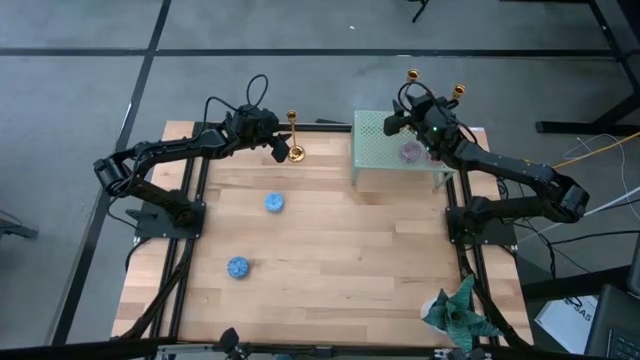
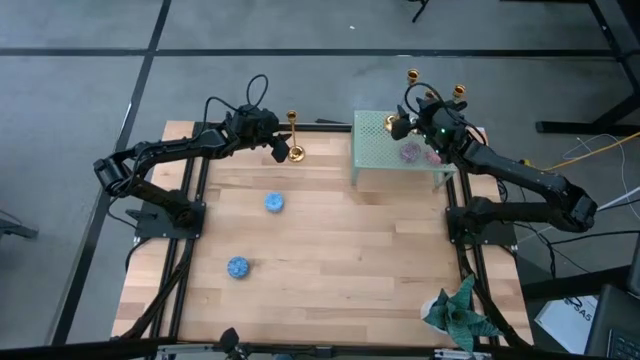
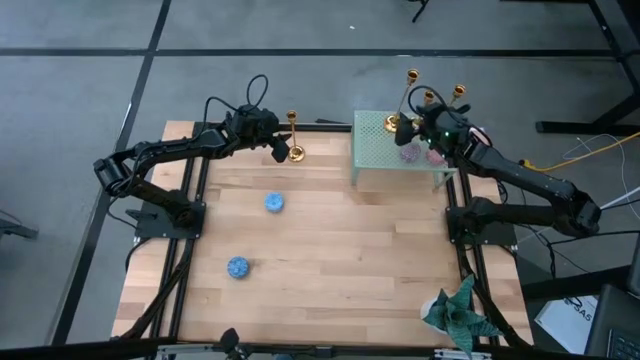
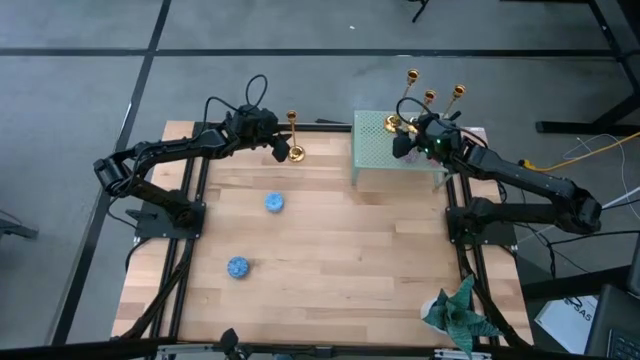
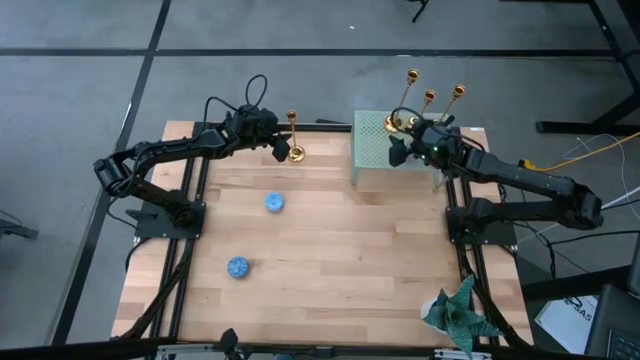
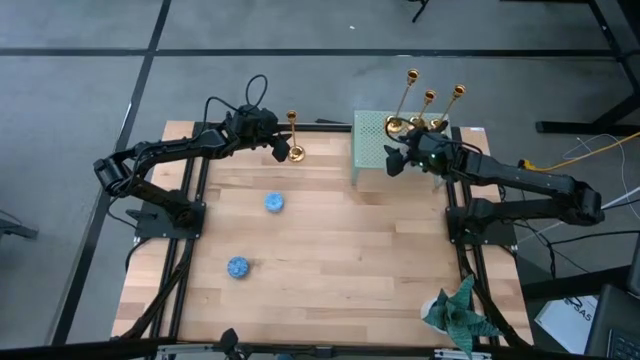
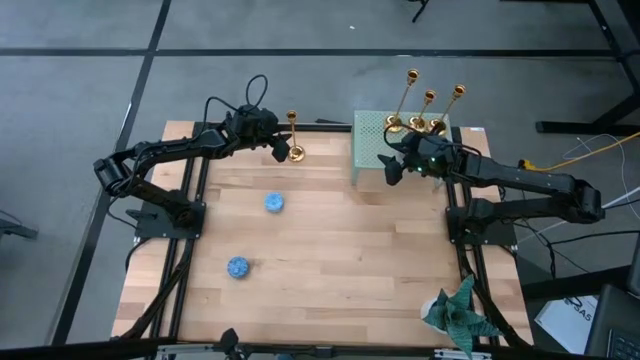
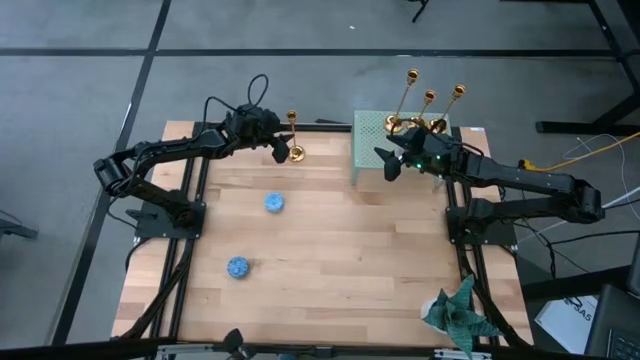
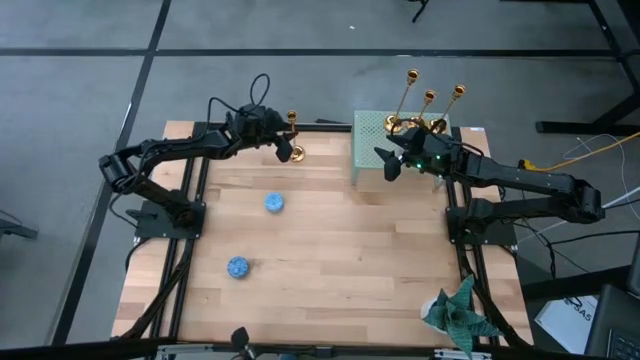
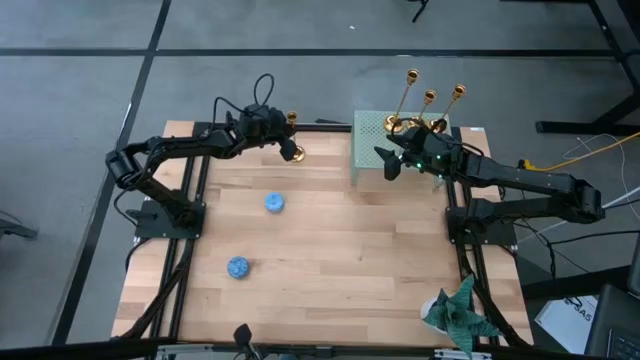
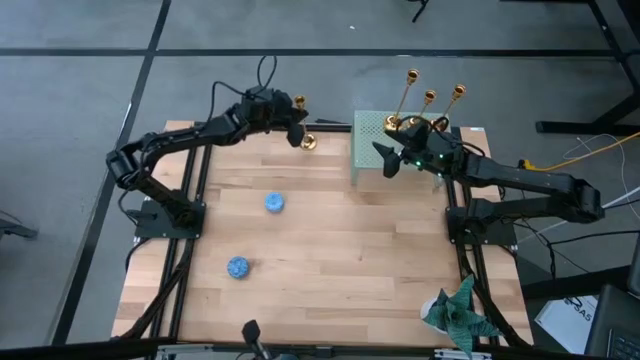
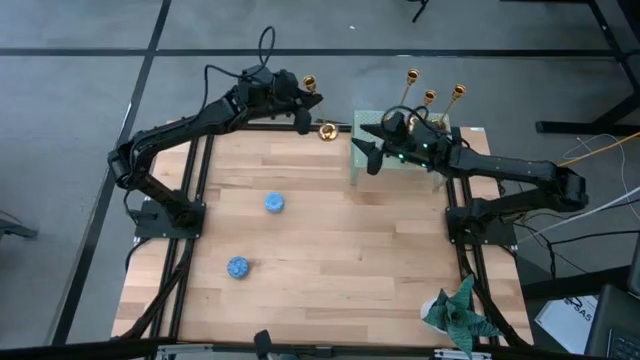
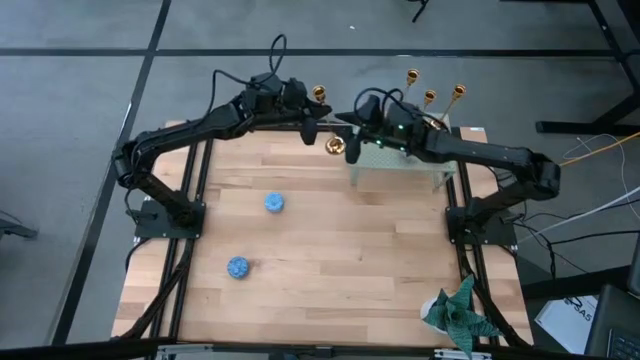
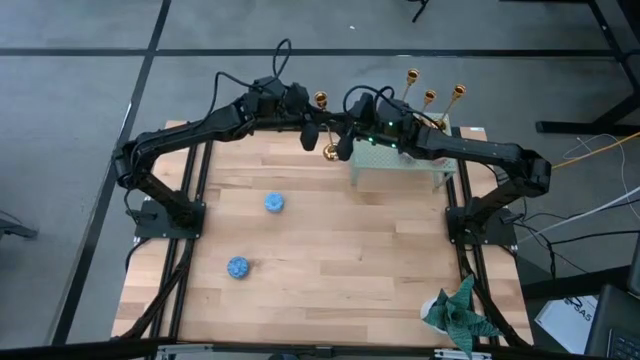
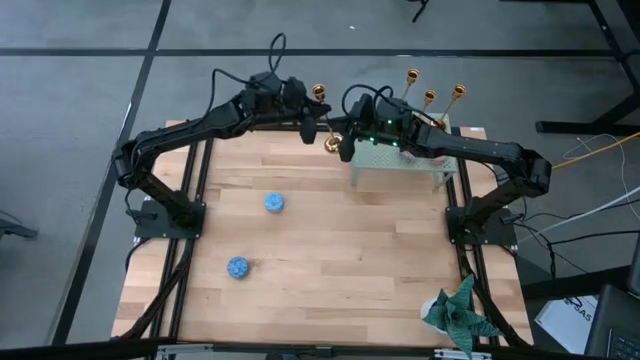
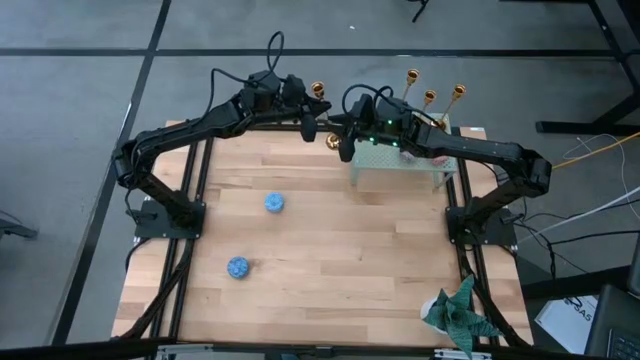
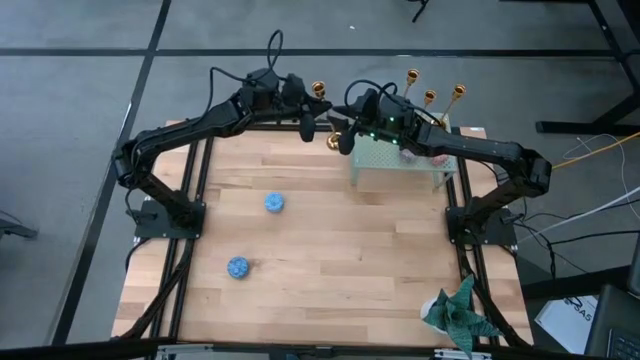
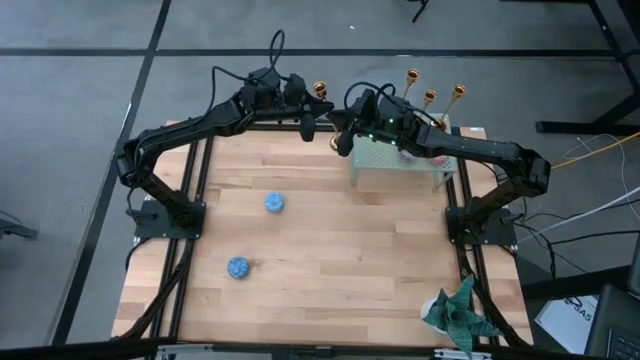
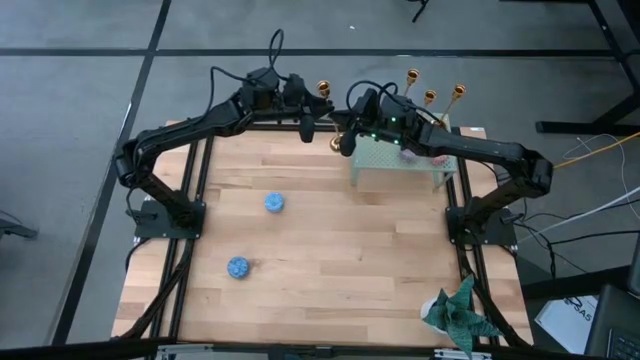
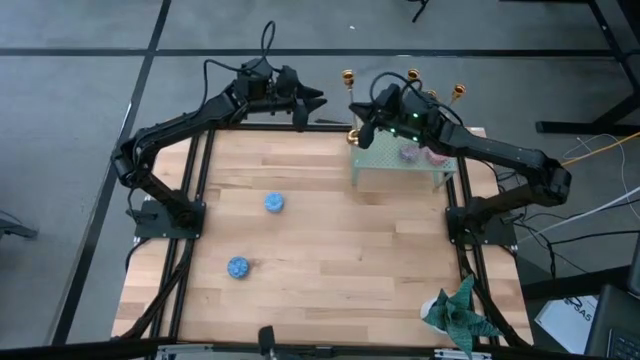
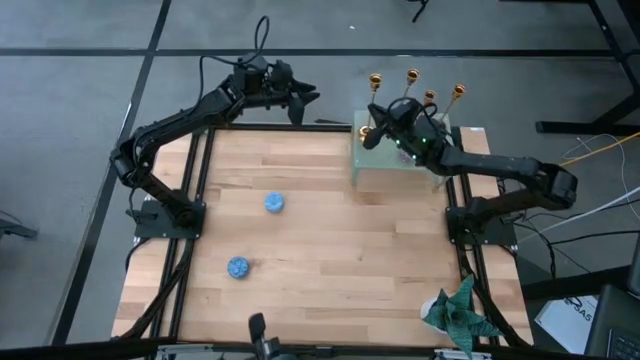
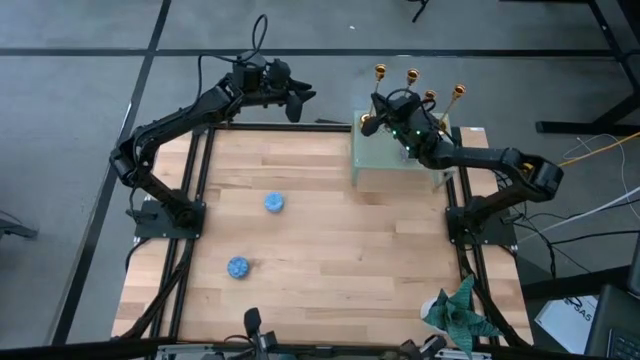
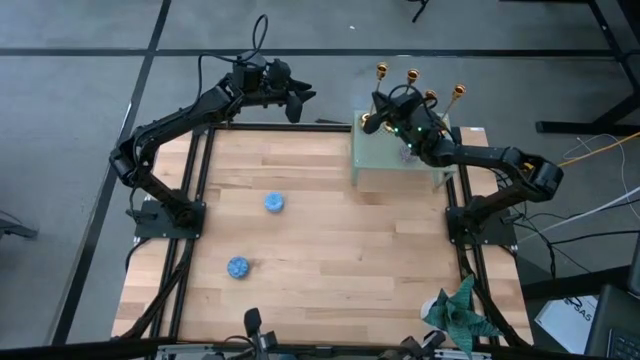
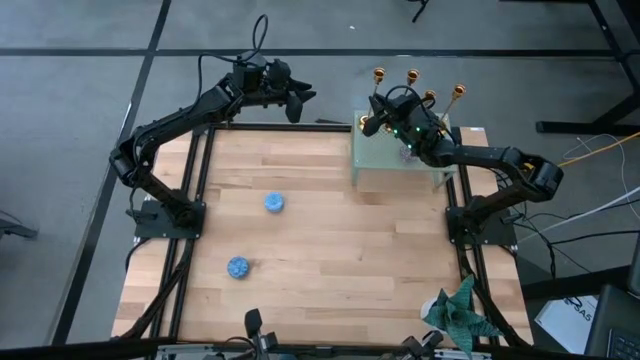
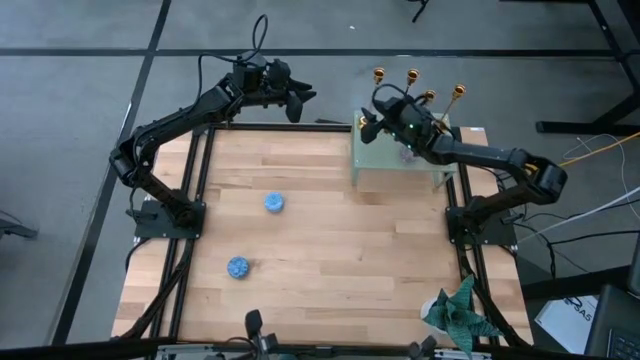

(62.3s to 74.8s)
Task: Pick & Place candle stick holders
Put the gold candle holder on the shelf

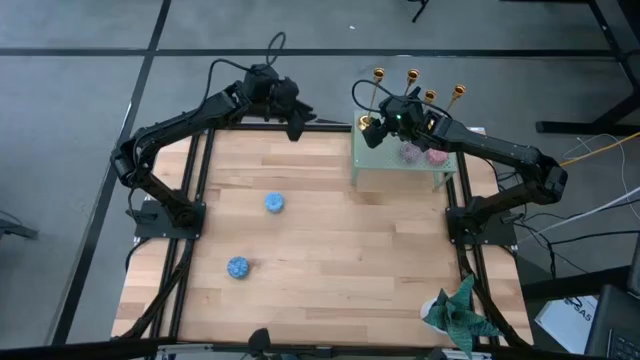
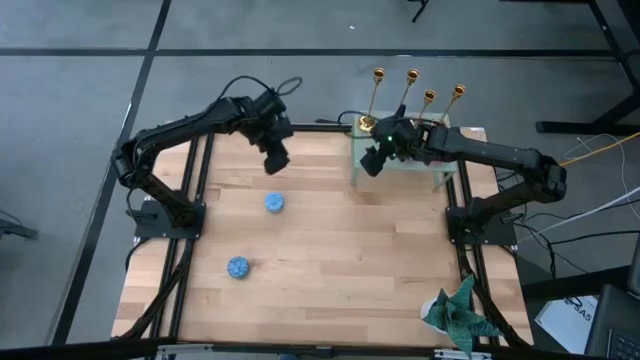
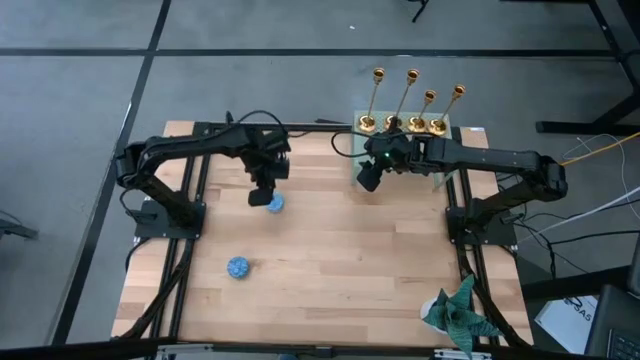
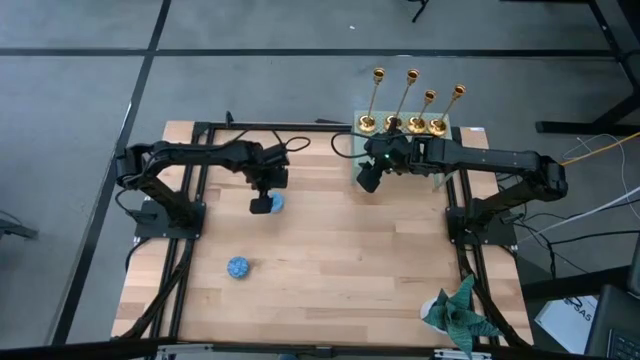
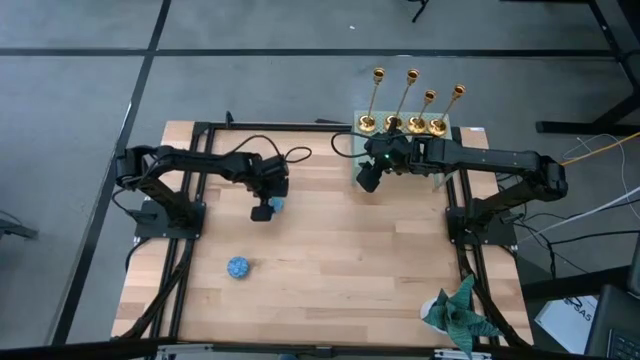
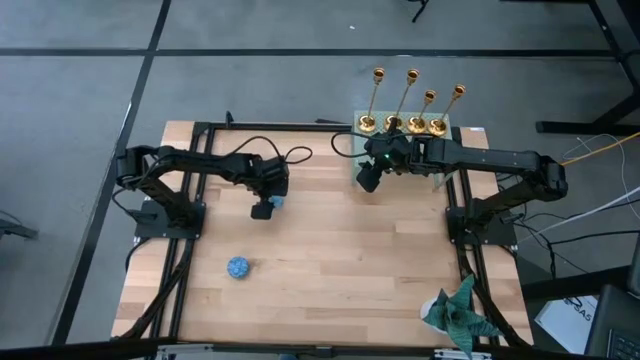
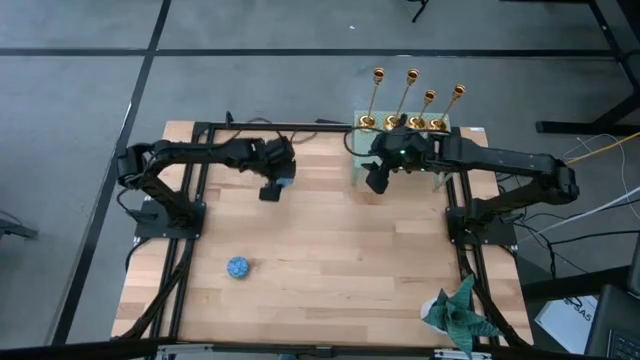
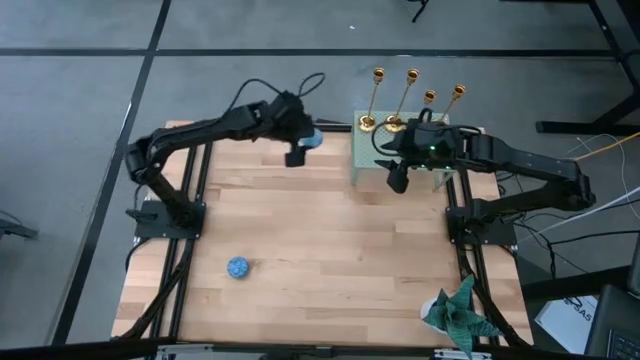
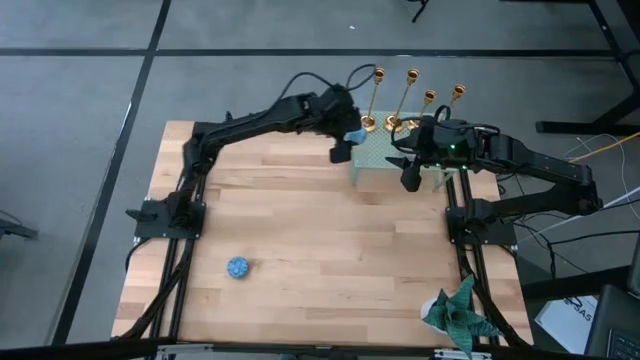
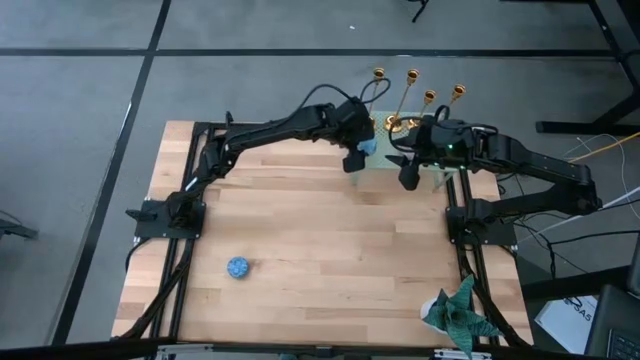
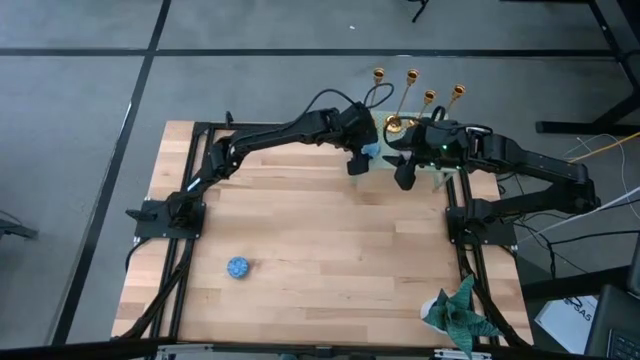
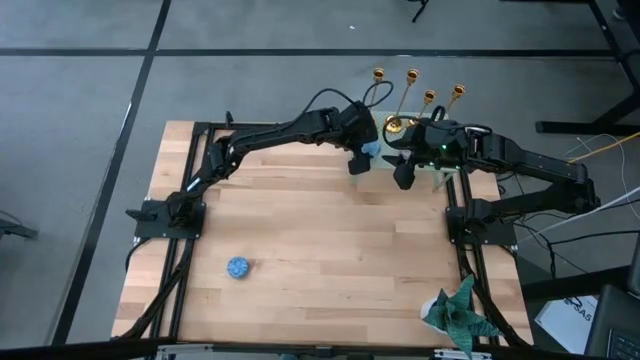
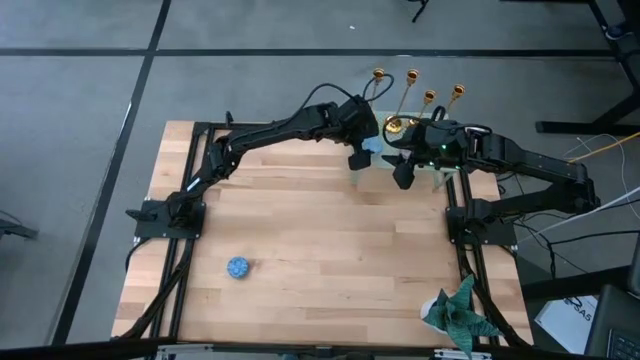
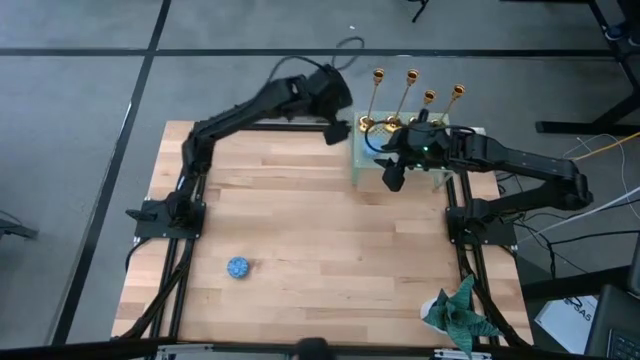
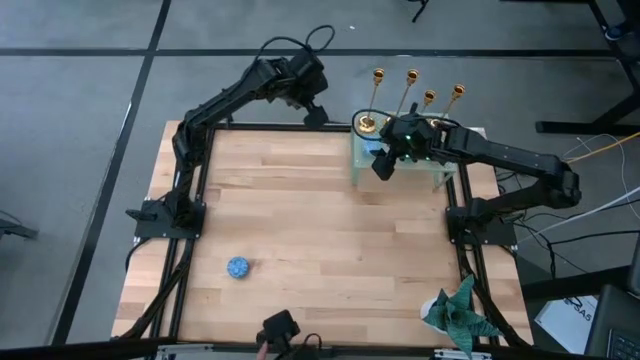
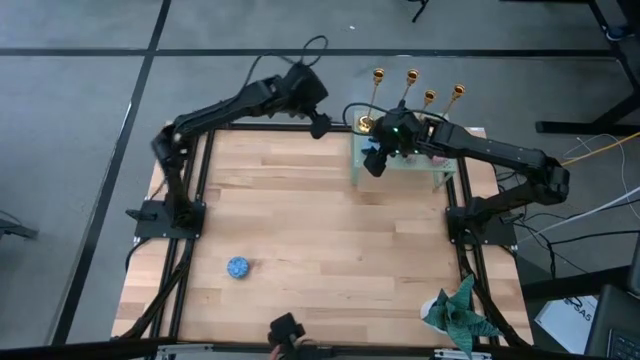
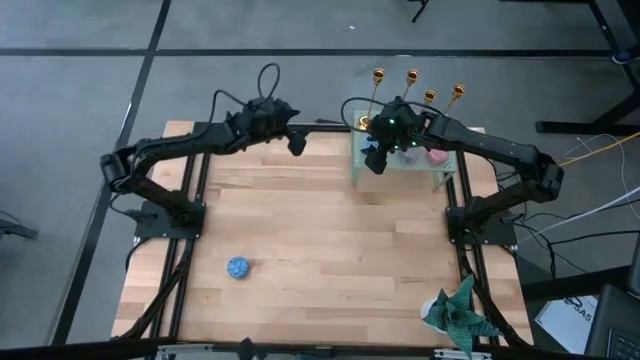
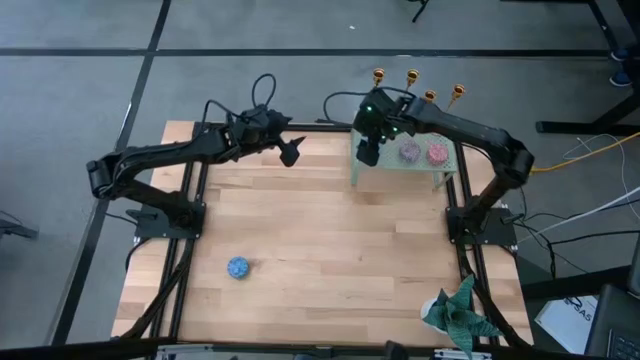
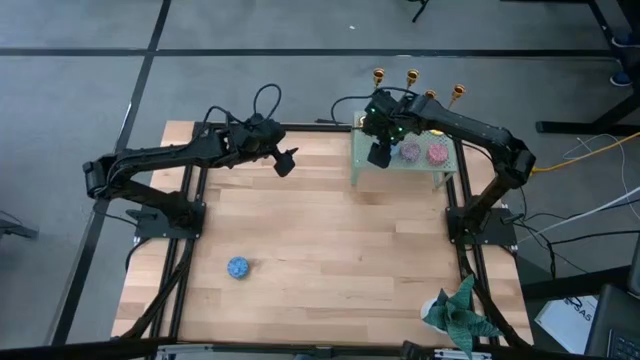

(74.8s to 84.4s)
Put the light blue scented candle on the shelf
